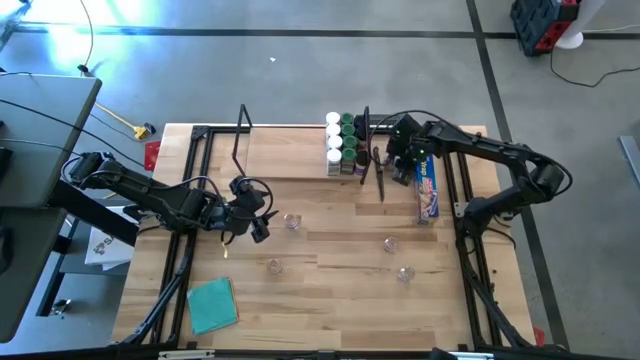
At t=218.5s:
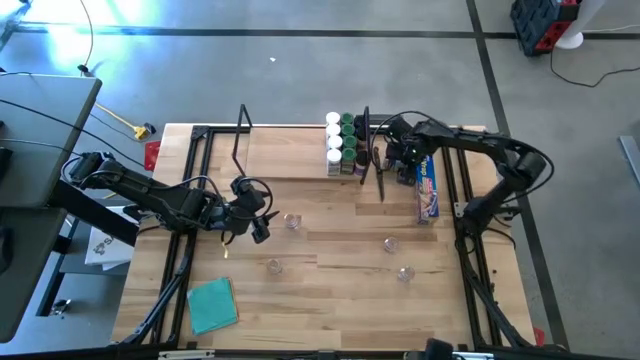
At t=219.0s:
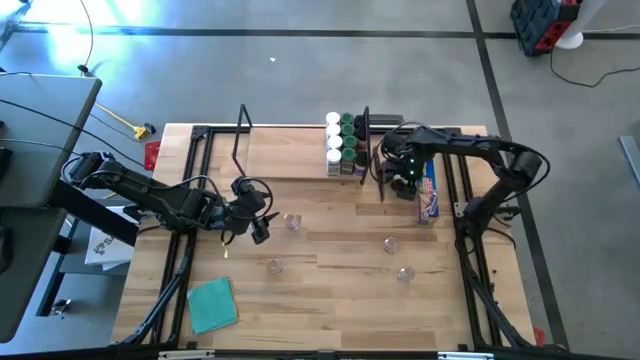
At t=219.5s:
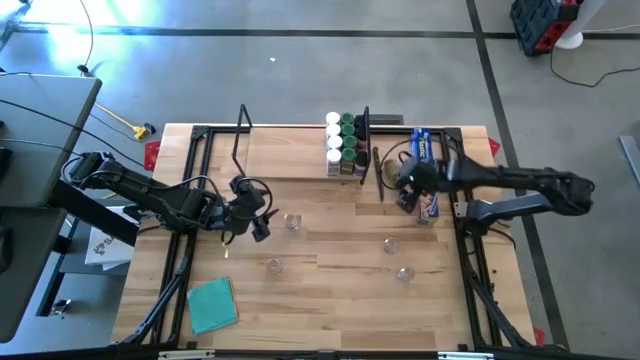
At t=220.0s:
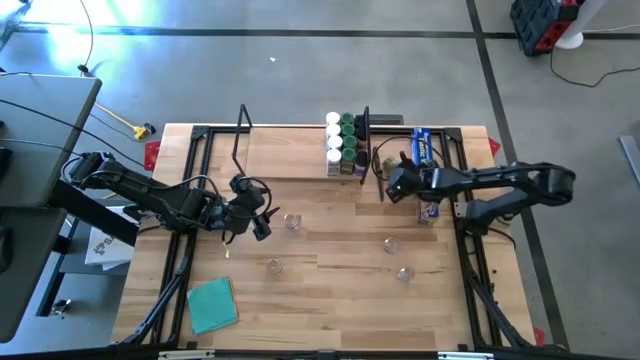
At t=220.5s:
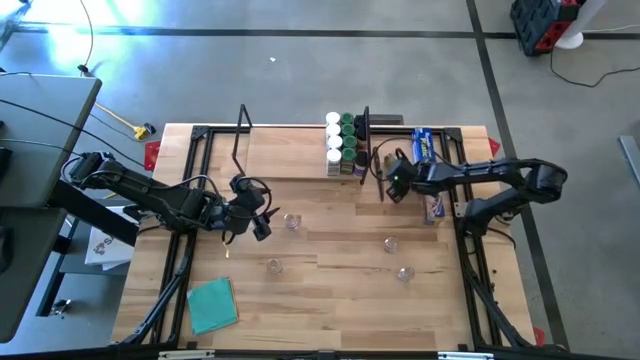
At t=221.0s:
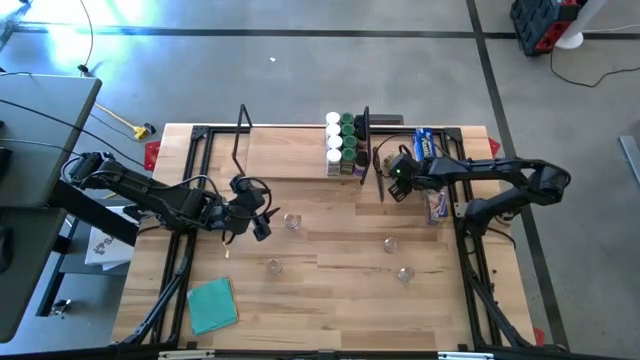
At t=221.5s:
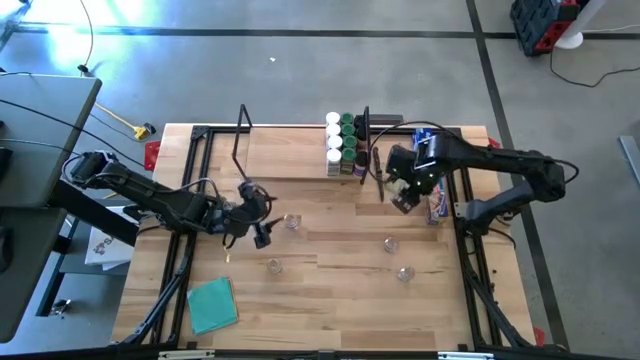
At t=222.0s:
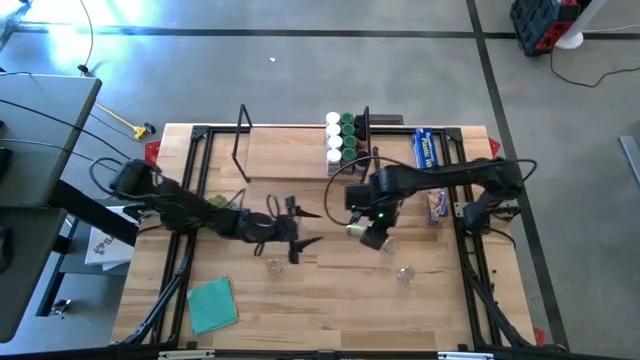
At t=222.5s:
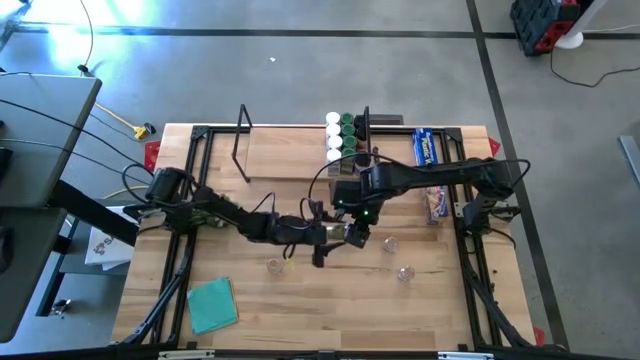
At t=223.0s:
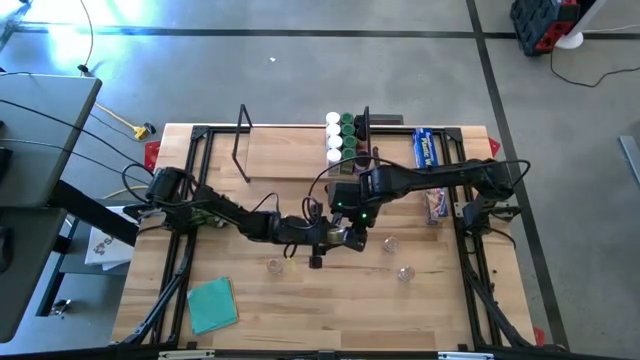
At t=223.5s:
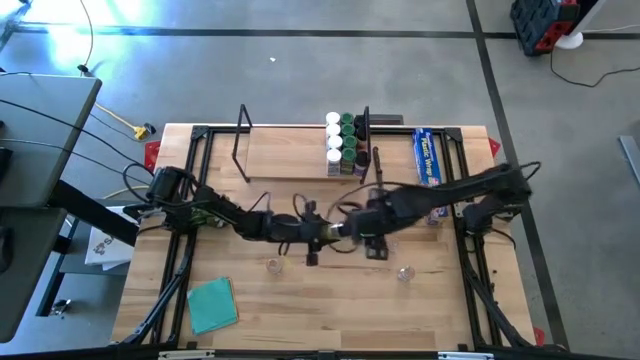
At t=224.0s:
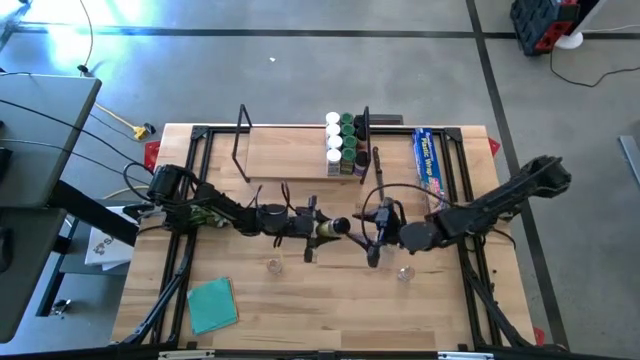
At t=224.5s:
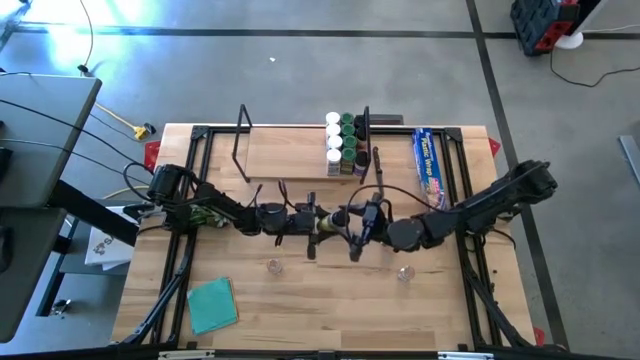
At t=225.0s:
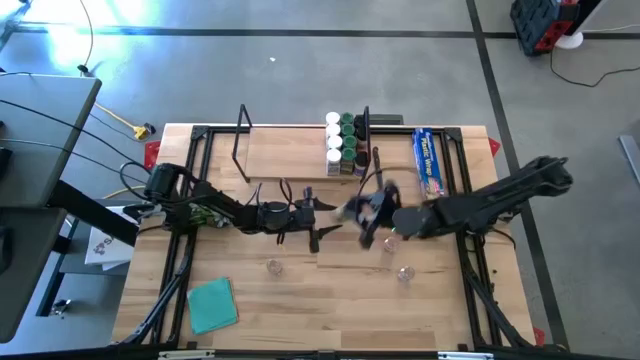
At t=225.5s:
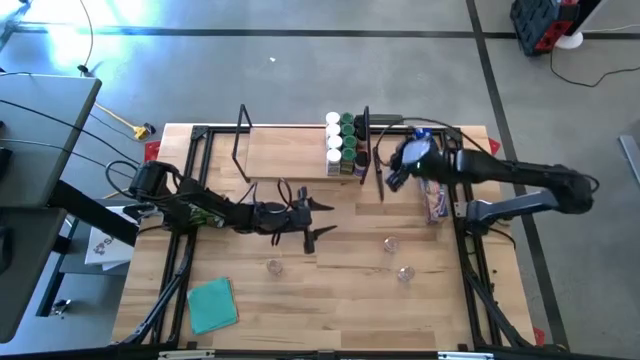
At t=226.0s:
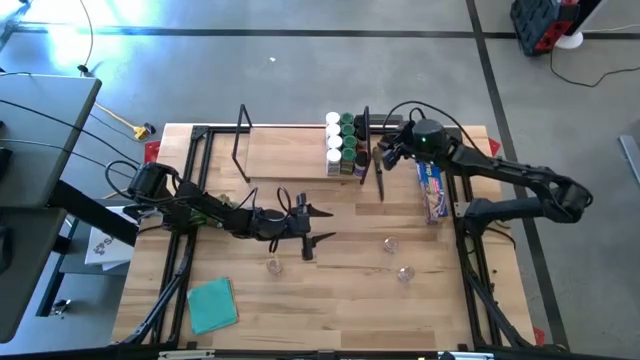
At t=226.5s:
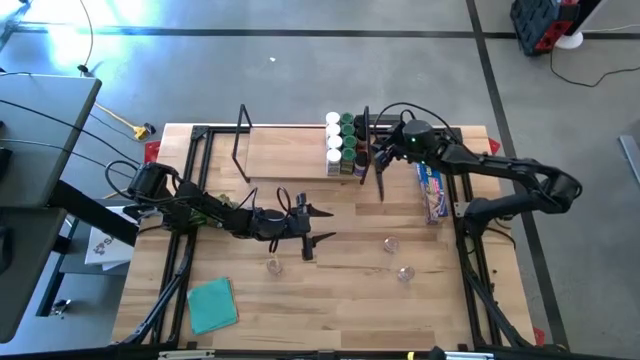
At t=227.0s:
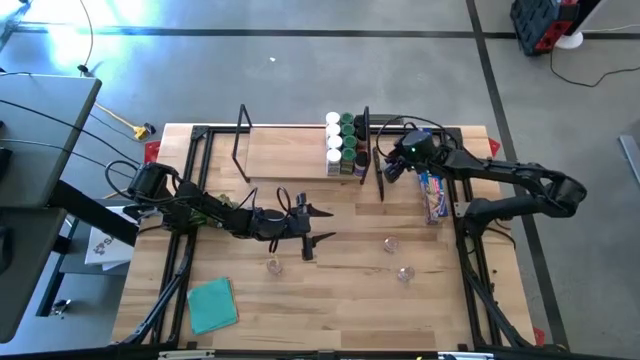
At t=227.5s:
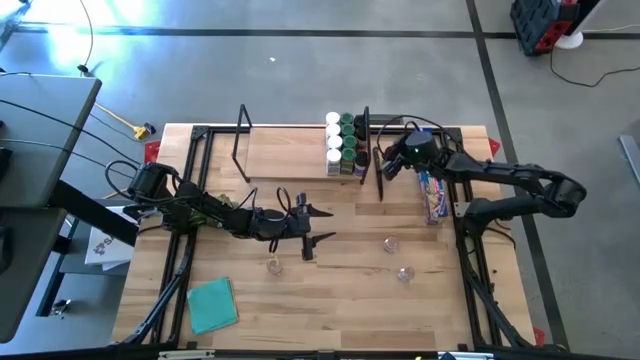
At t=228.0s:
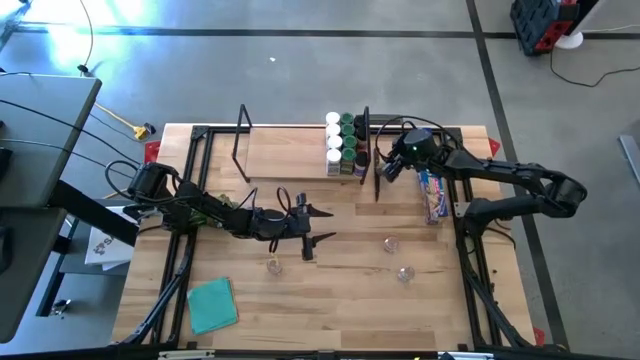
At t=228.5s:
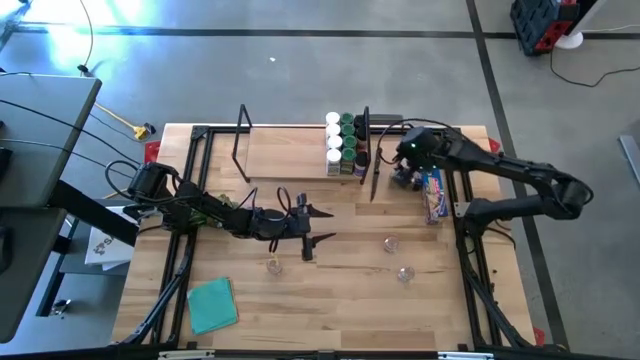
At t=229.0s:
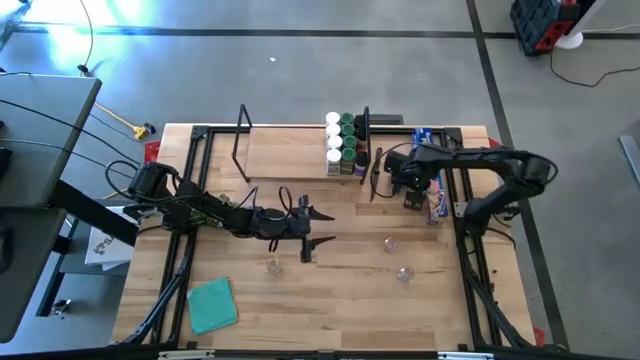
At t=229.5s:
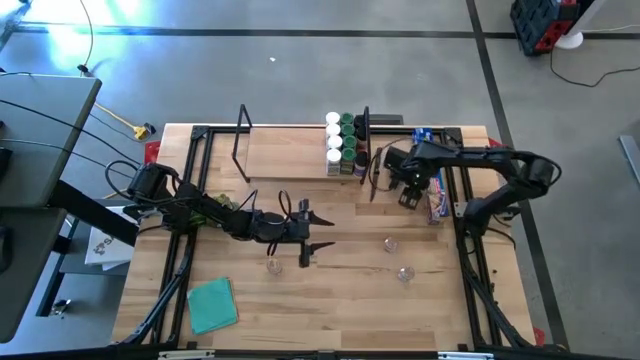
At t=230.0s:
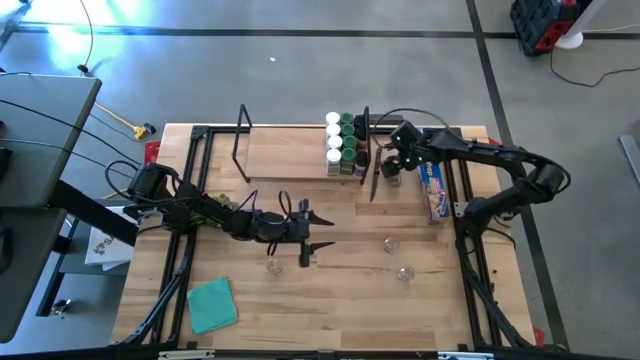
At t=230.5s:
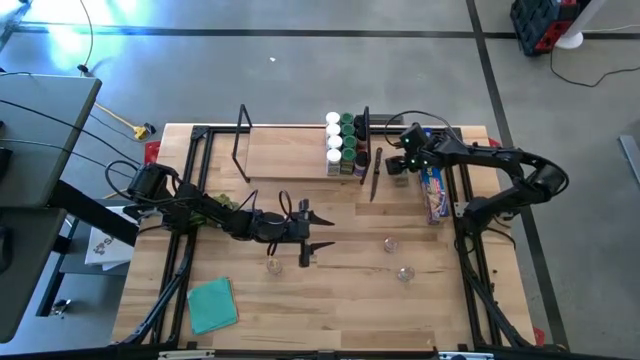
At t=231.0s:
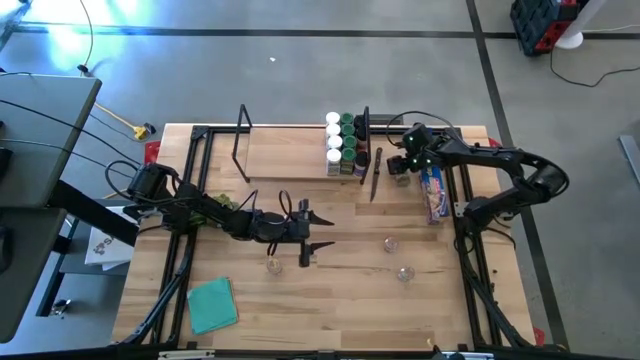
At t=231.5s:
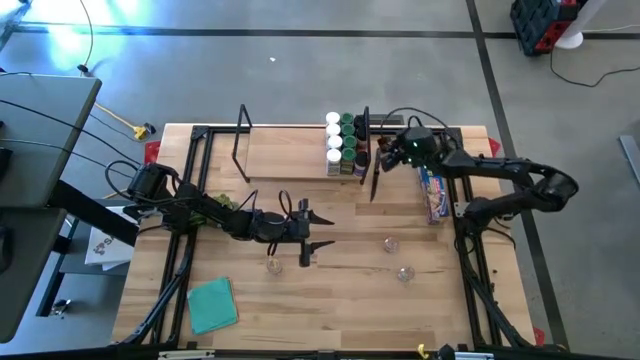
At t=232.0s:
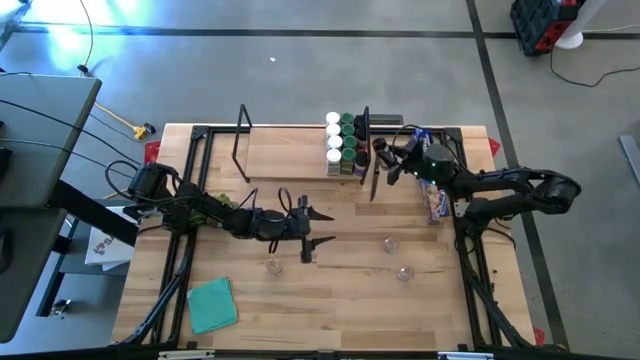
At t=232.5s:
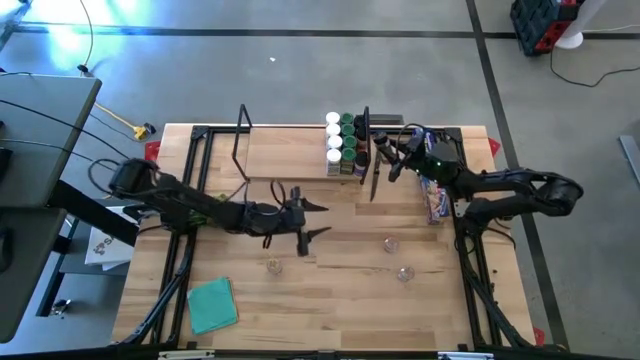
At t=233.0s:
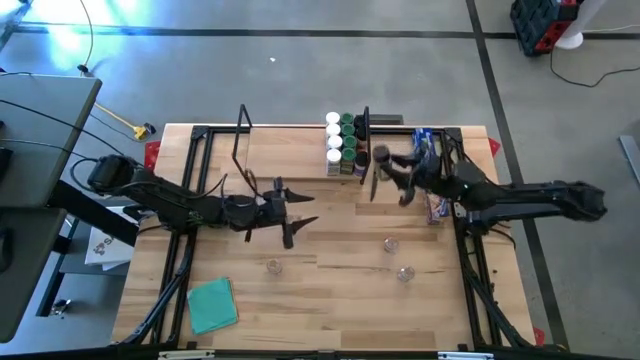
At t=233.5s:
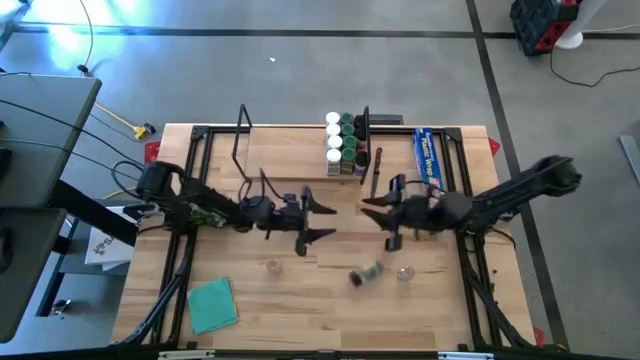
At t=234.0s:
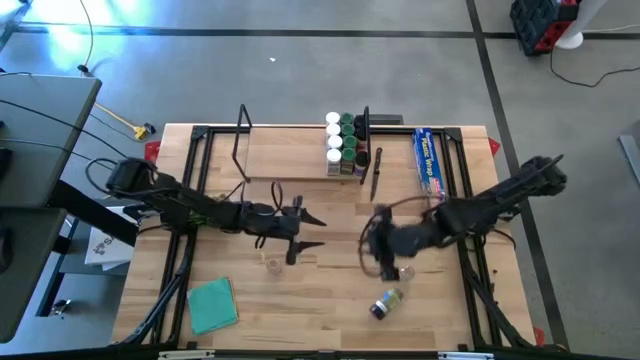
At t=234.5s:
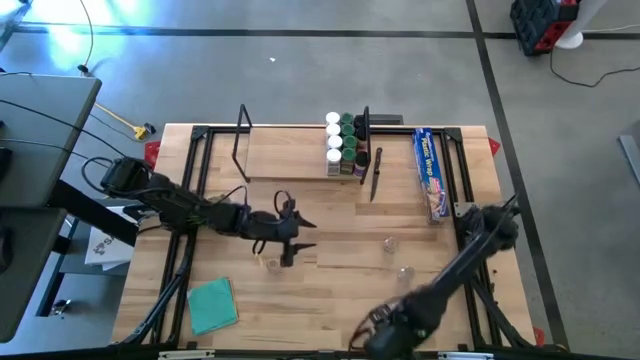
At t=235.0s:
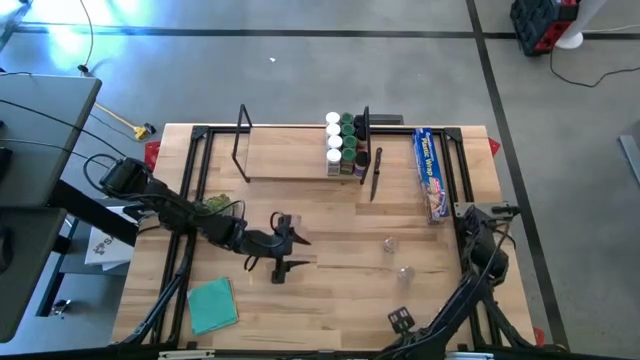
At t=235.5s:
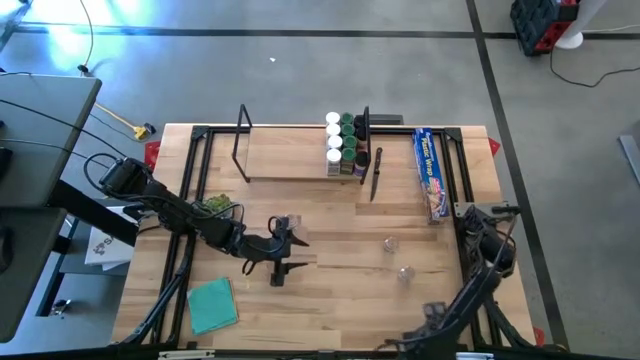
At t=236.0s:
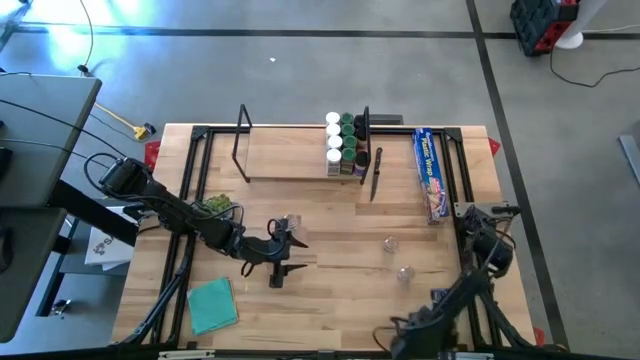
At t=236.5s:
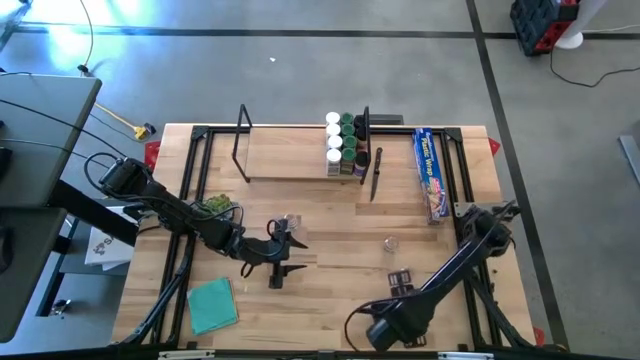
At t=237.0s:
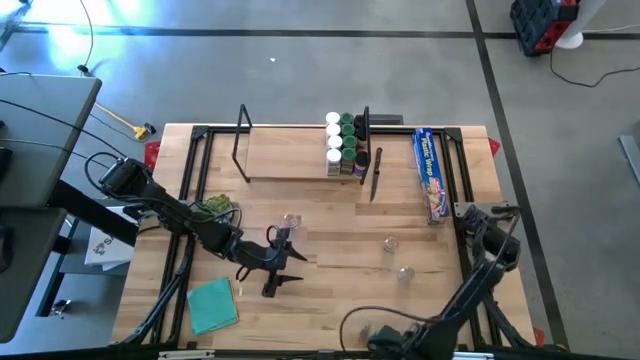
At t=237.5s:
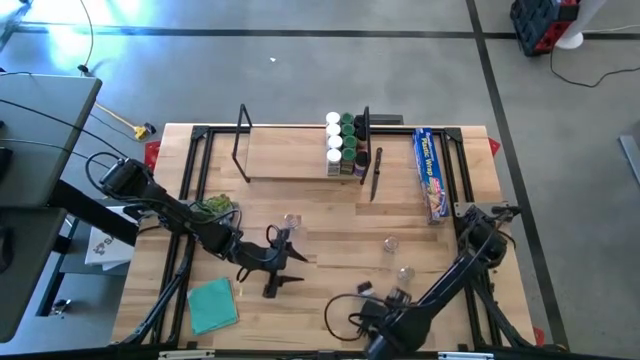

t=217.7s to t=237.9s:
Task: Shelf spices
Adjust the black seasoning bottles on the shelf
